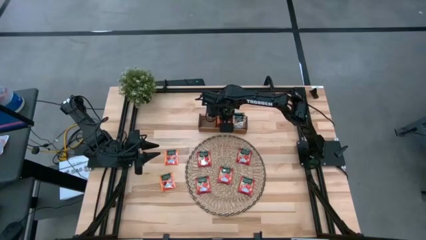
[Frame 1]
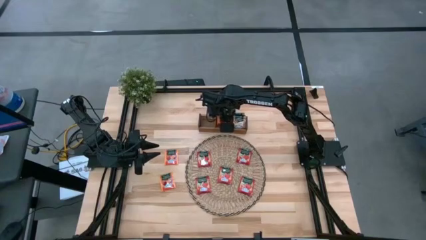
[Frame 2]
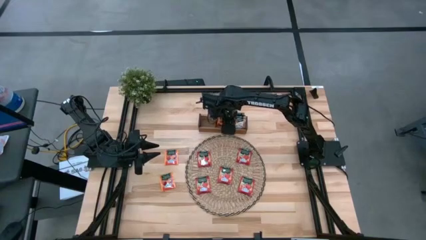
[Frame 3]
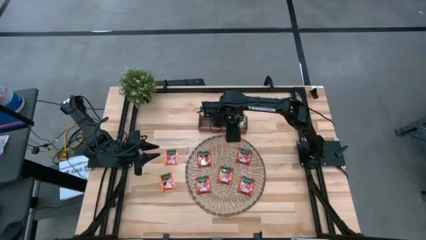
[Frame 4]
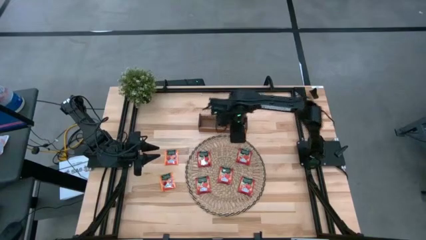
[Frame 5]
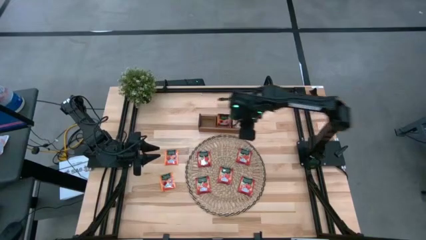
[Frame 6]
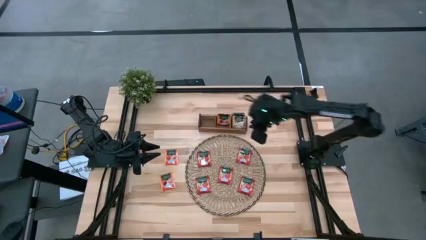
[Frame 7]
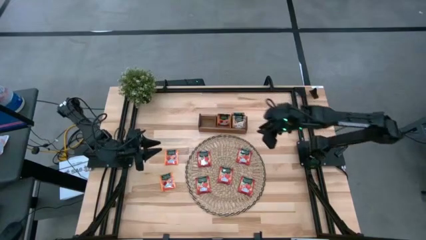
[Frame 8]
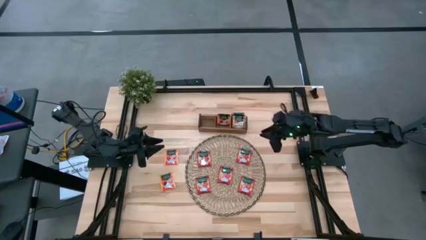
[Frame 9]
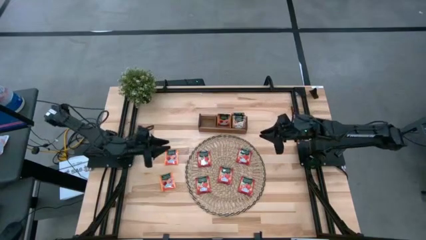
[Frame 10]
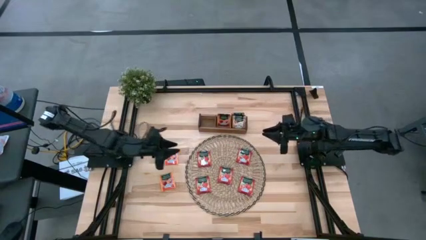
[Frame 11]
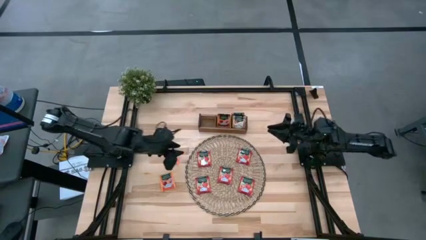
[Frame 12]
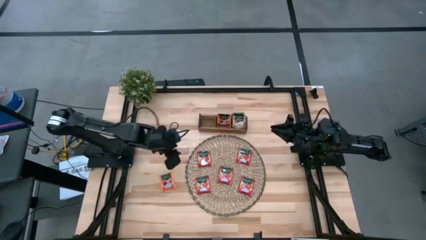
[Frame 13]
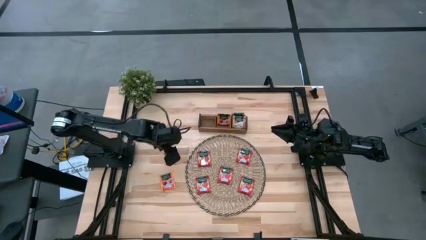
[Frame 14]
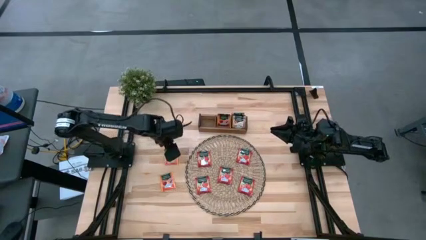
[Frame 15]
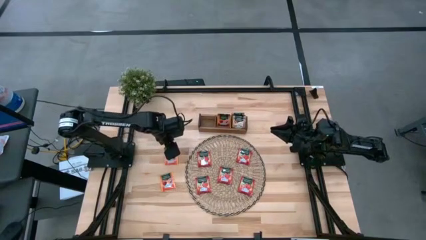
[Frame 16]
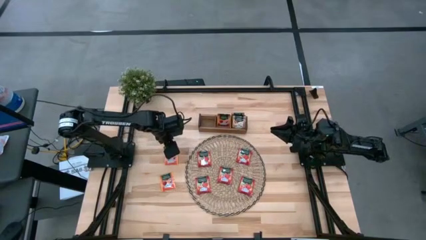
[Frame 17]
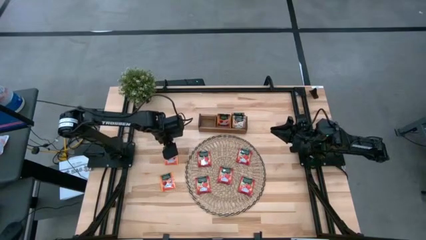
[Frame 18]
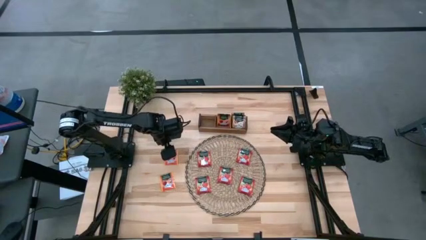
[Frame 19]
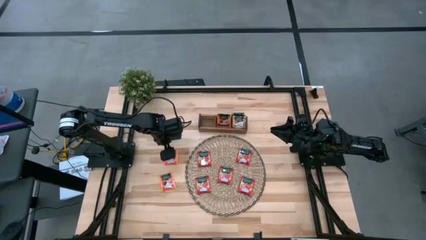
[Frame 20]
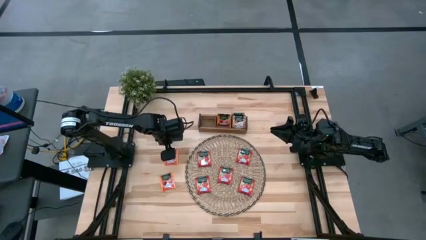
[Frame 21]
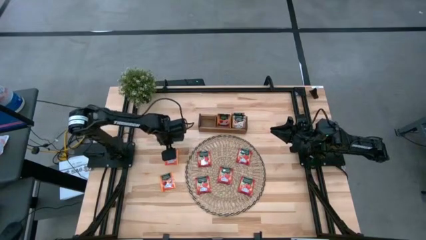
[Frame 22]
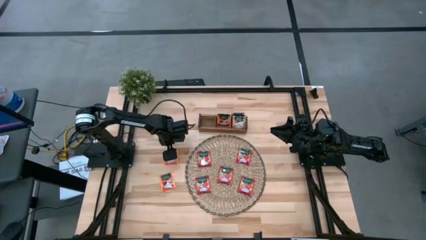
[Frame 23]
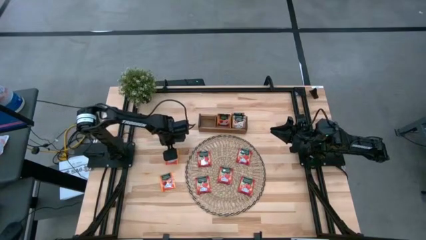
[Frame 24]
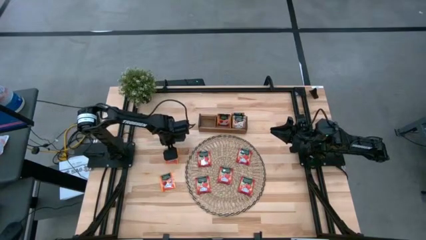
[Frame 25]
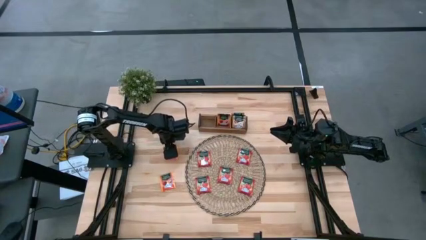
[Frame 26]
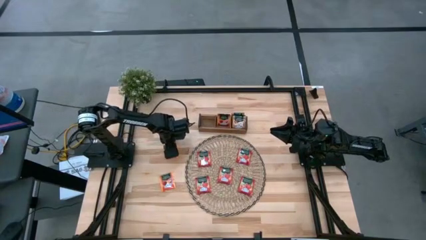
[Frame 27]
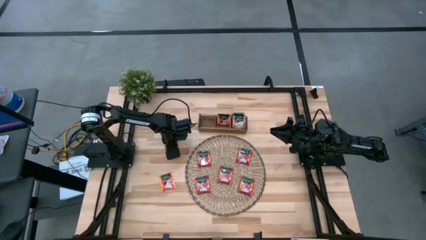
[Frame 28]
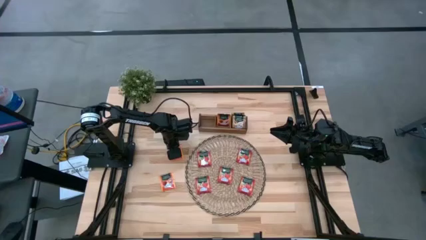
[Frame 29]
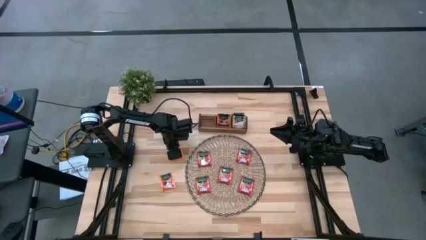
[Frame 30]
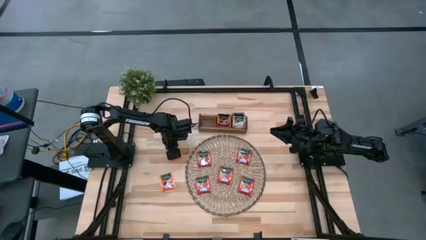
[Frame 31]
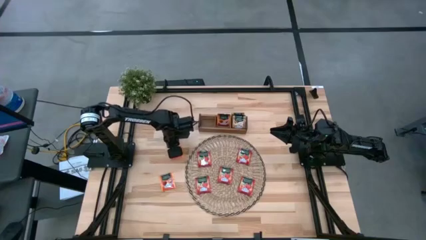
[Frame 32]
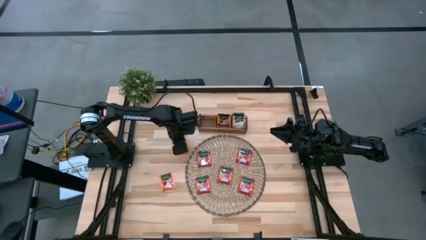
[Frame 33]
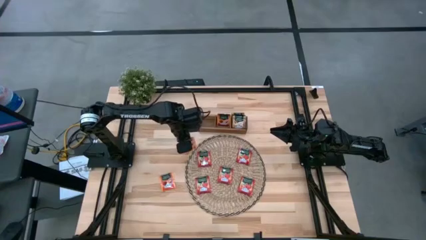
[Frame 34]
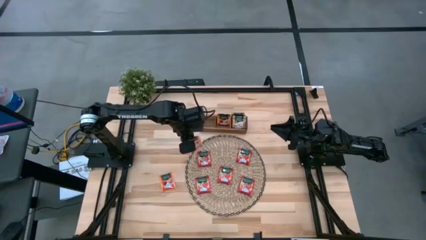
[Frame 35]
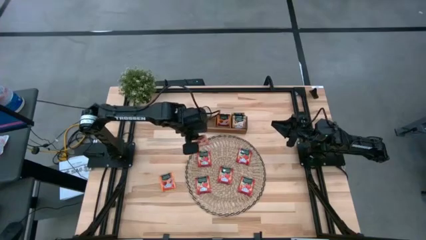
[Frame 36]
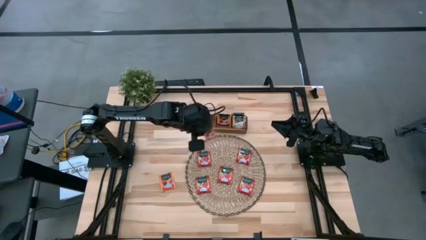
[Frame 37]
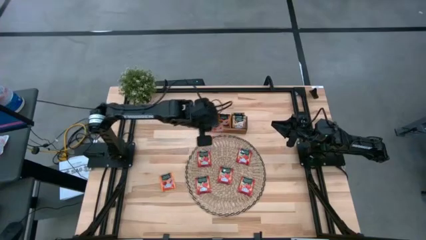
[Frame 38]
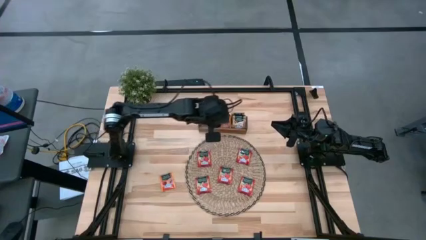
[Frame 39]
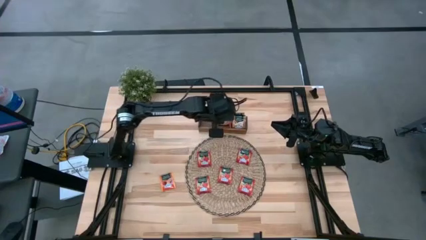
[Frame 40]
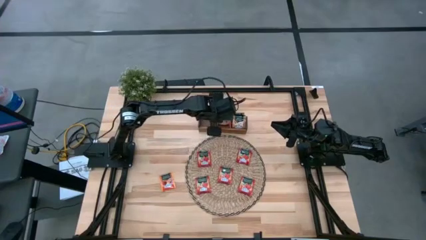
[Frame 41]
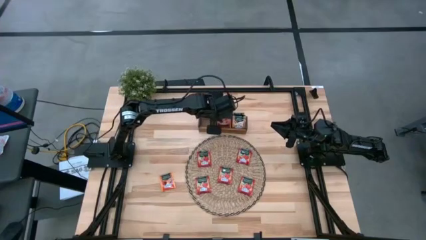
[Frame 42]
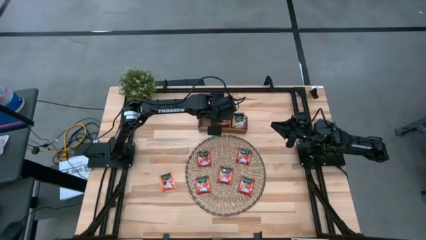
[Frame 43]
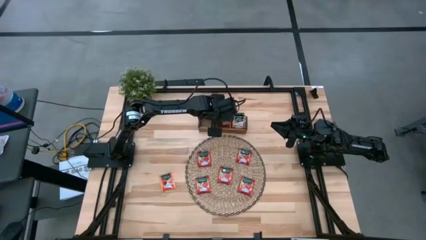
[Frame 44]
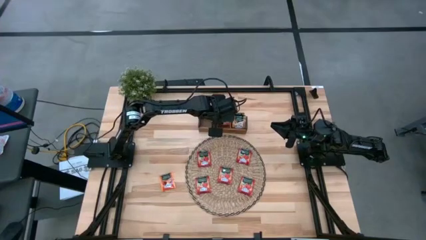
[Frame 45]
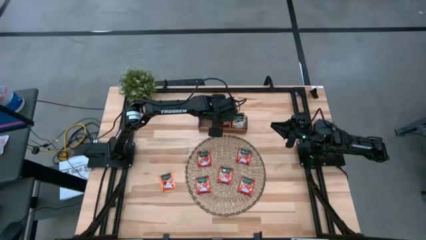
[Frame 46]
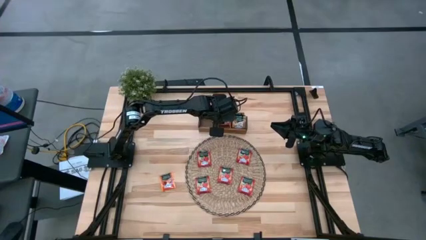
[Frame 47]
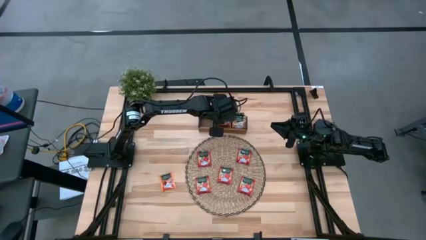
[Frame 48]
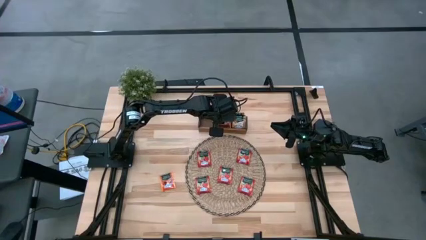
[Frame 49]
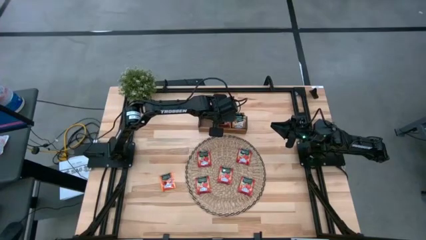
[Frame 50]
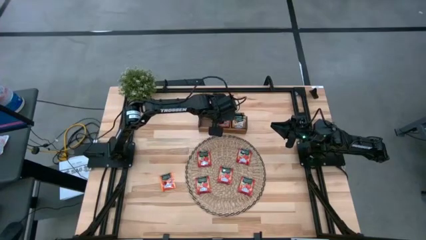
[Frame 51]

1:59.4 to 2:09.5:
Task: Pick & Place Tea
Put the pink tea bag into the middle section of the wooden organizer

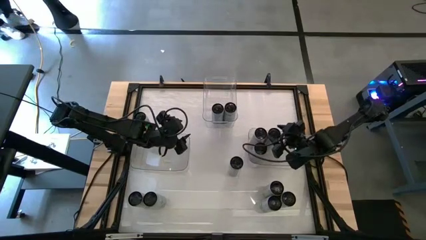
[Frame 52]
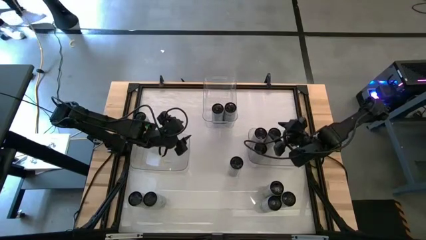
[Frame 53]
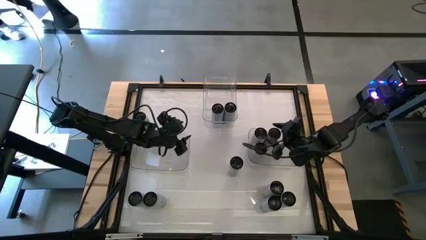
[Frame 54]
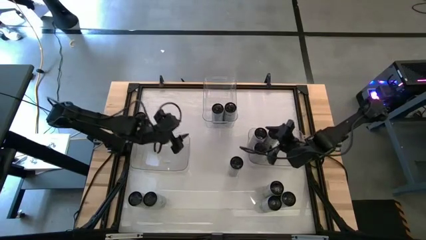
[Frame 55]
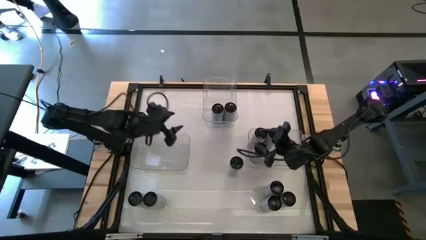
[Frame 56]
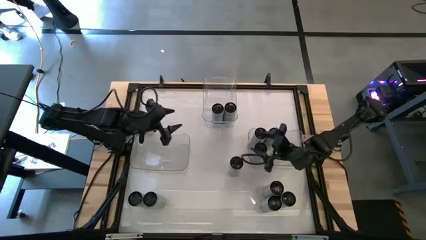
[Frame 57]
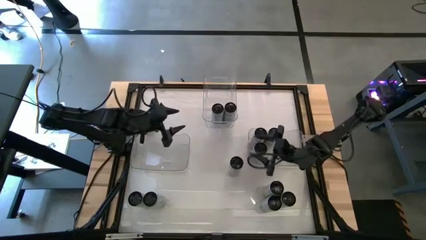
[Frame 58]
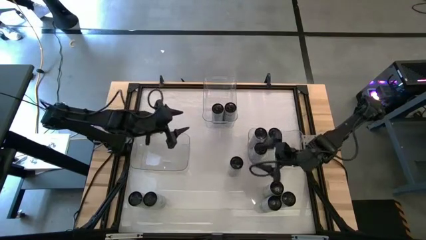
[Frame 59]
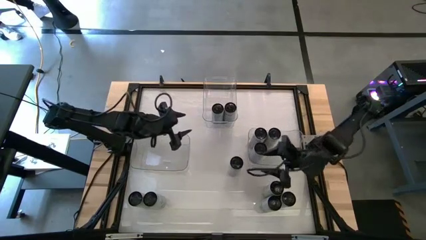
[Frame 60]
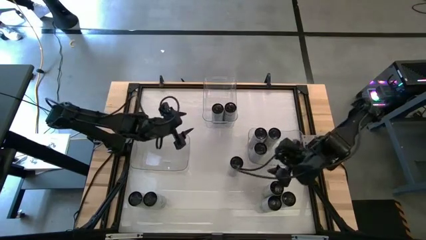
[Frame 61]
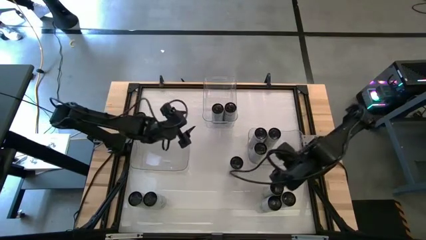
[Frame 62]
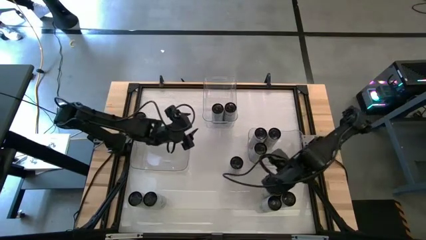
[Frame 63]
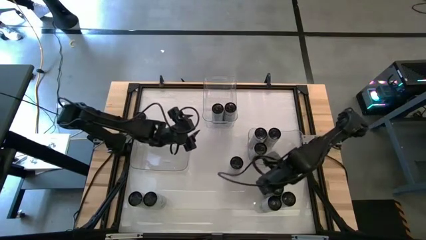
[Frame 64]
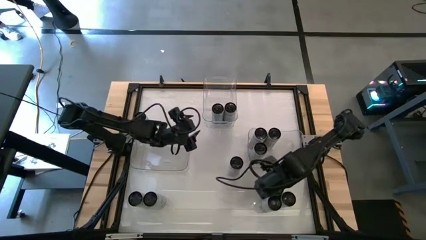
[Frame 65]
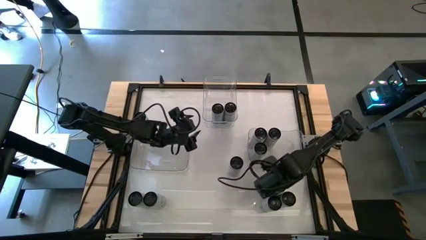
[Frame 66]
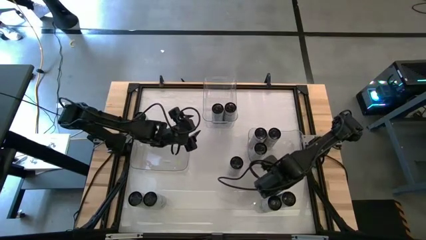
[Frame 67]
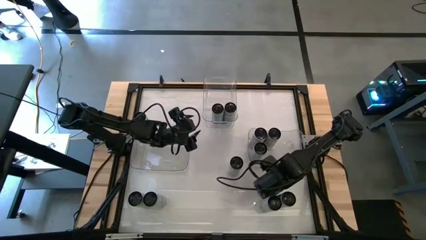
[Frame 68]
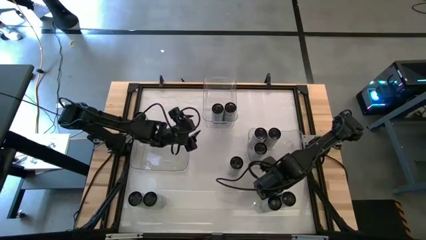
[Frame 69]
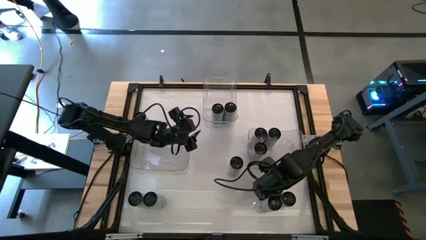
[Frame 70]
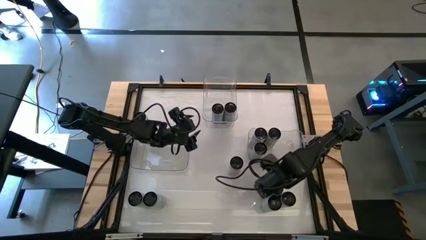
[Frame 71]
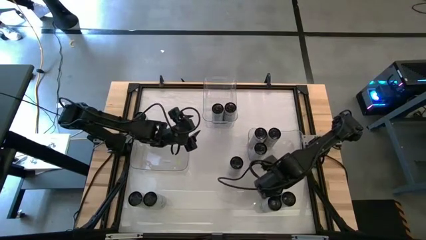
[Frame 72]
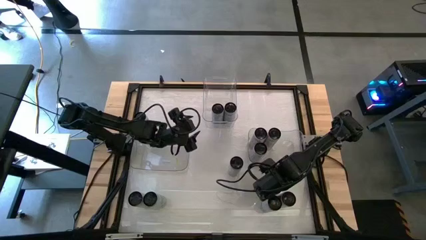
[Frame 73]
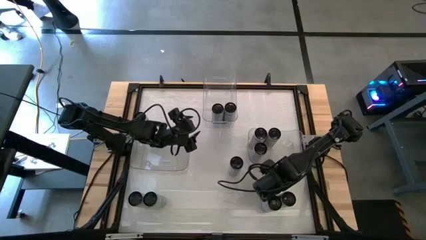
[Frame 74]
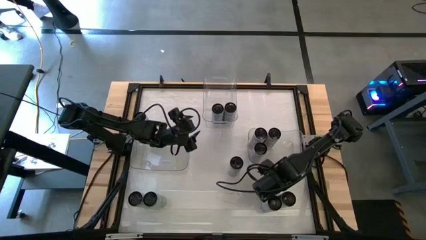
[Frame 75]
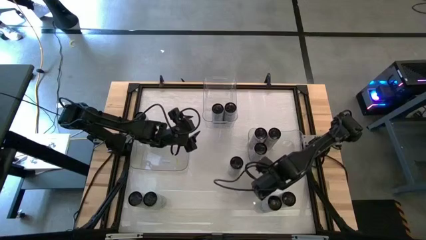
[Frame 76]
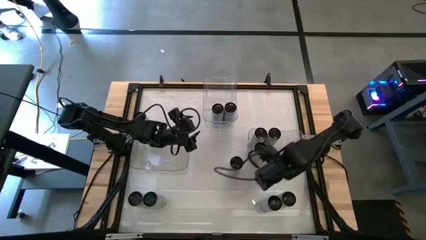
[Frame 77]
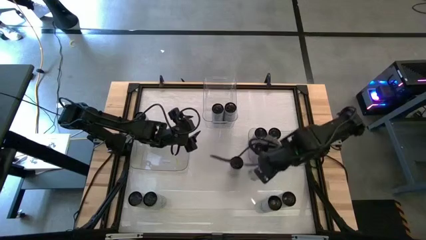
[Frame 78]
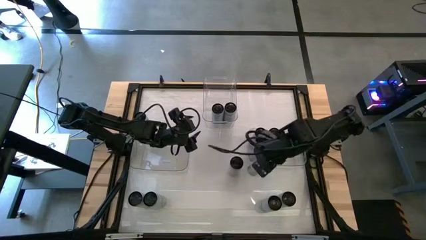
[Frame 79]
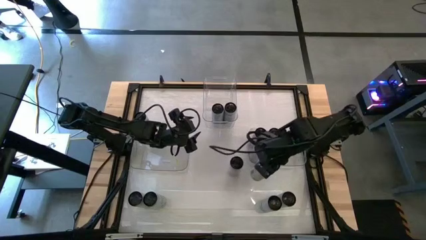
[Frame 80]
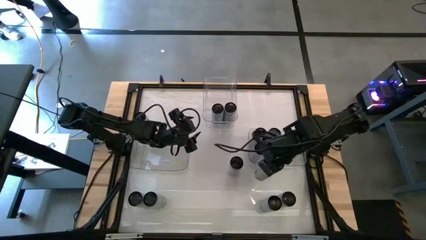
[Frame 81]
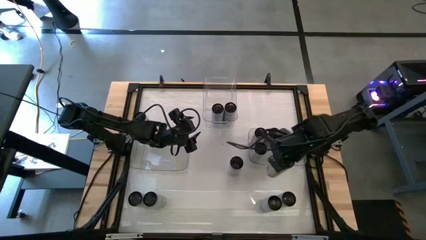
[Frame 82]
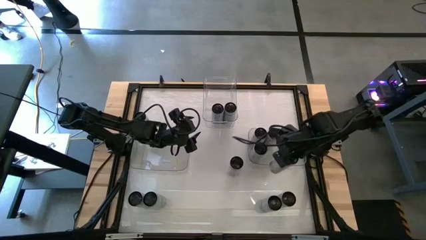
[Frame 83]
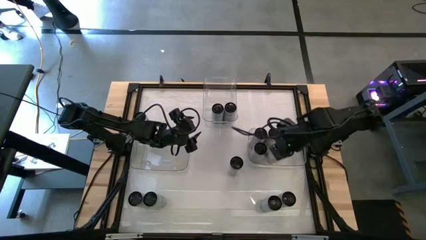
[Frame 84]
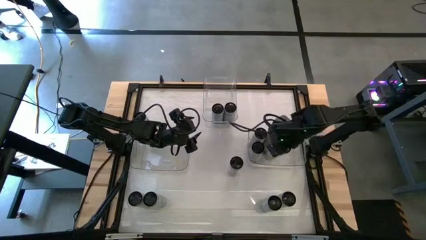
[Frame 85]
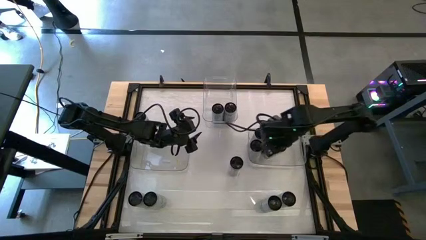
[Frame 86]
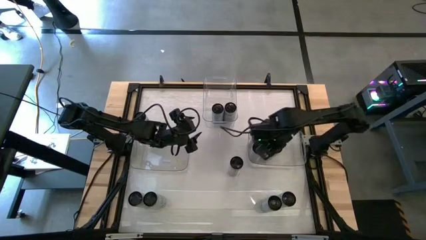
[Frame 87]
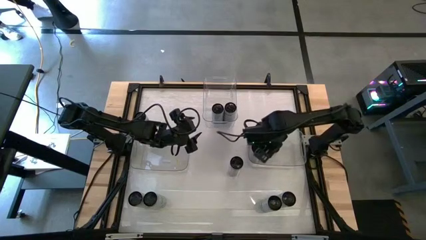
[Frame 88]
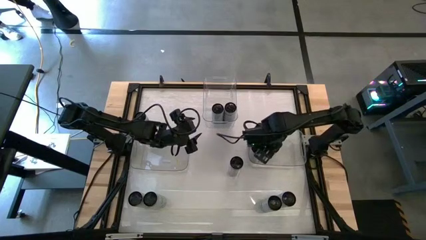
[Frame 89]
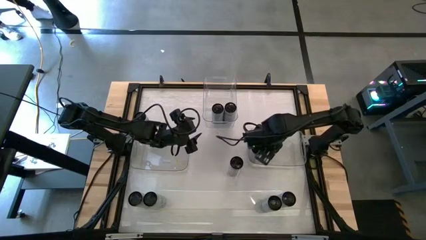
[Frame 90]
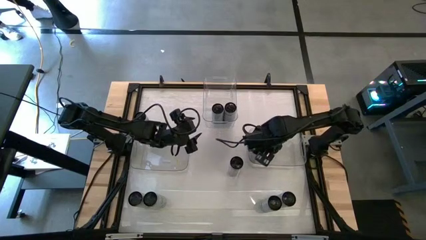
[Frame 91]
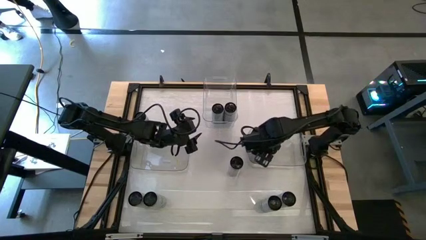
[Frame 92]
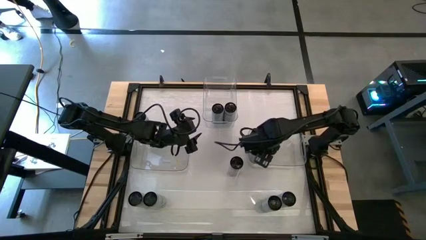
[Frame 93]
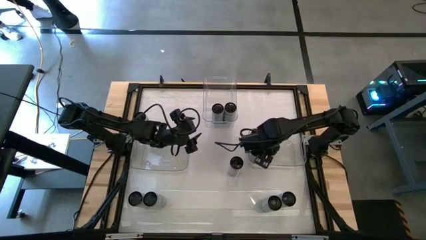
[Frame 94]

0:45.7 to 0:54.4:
Task: Sort soda cans
Put the white-yellow soda can into the bottom right transparent bin
